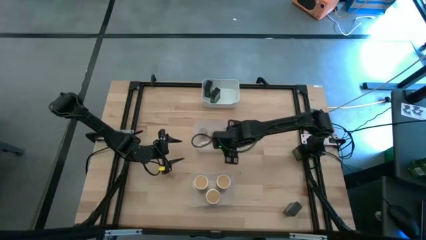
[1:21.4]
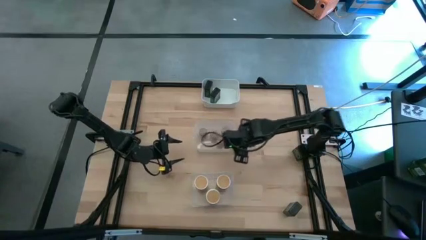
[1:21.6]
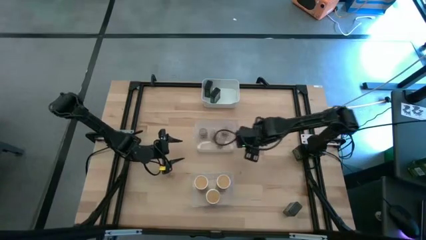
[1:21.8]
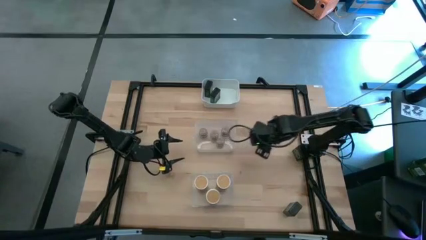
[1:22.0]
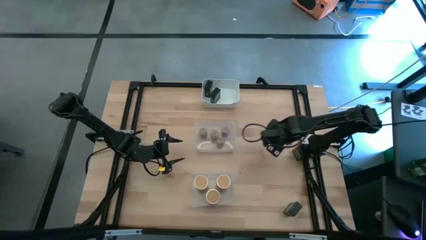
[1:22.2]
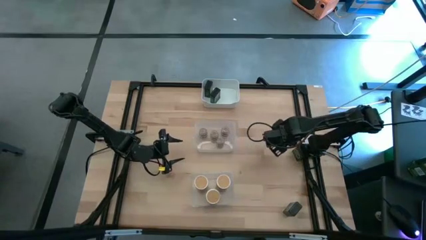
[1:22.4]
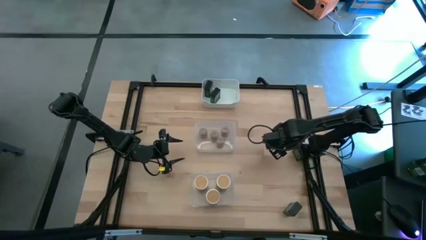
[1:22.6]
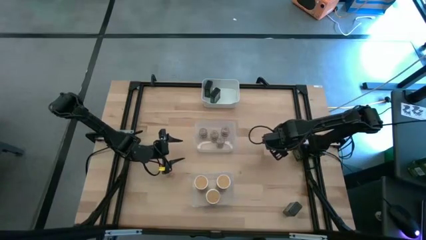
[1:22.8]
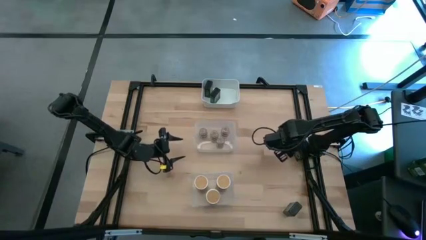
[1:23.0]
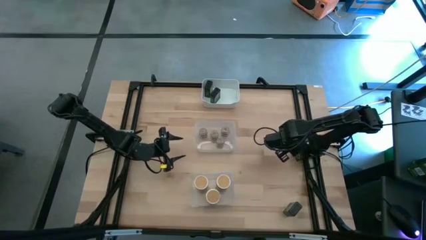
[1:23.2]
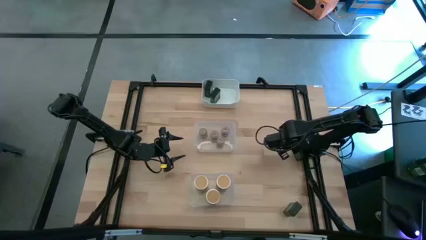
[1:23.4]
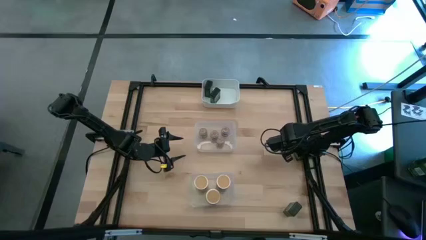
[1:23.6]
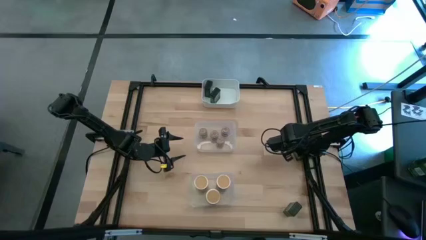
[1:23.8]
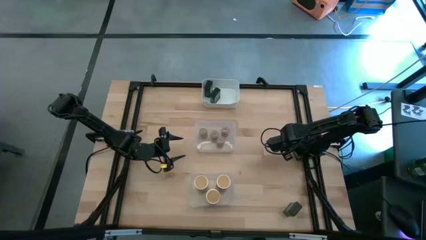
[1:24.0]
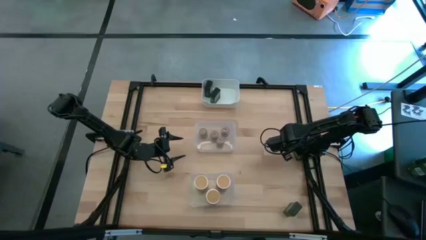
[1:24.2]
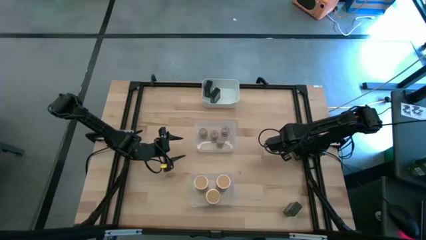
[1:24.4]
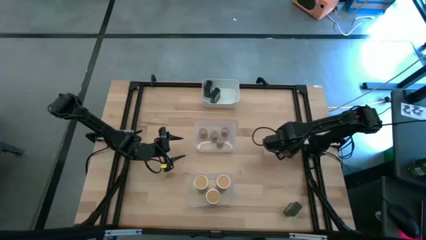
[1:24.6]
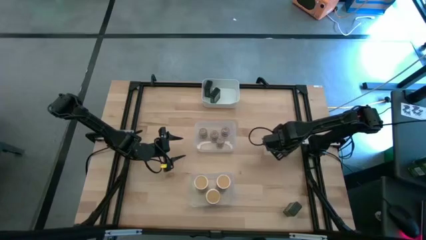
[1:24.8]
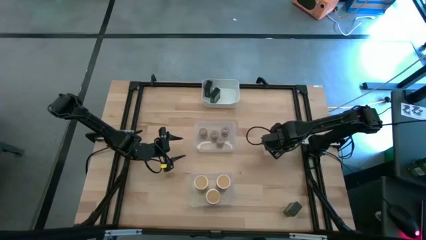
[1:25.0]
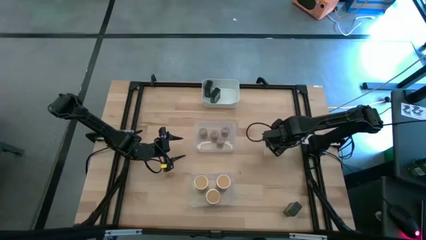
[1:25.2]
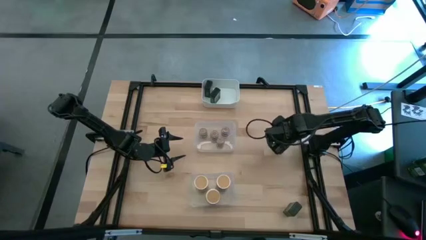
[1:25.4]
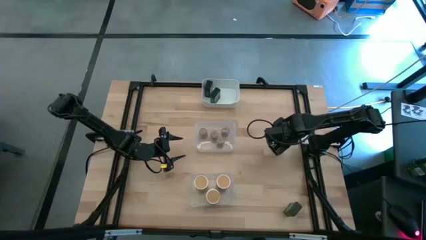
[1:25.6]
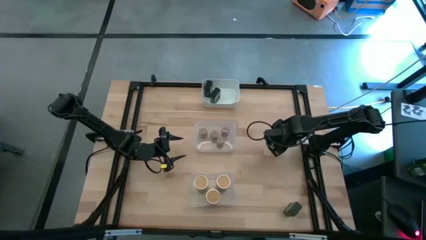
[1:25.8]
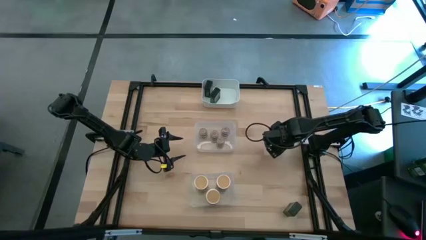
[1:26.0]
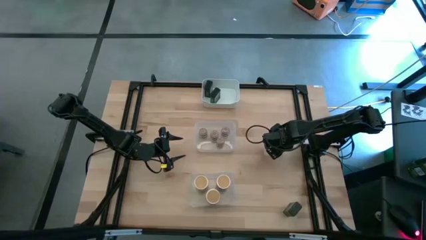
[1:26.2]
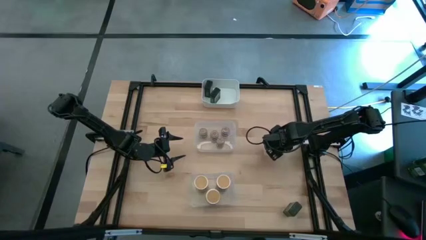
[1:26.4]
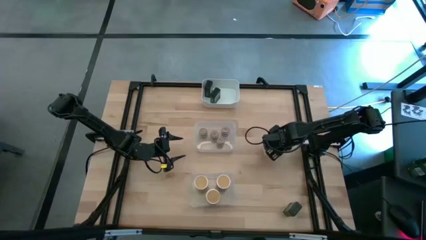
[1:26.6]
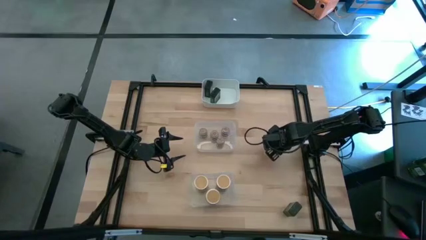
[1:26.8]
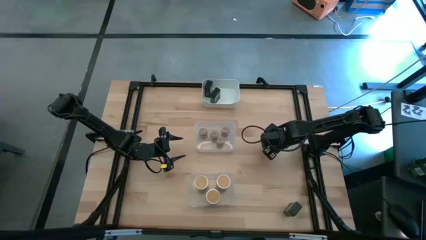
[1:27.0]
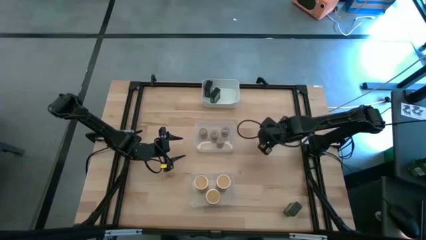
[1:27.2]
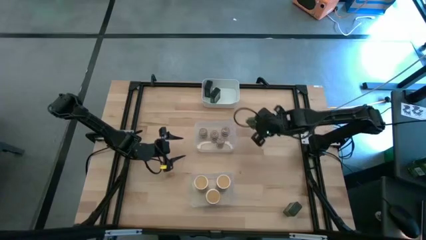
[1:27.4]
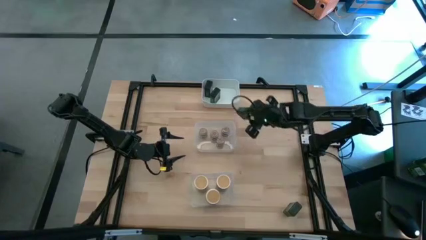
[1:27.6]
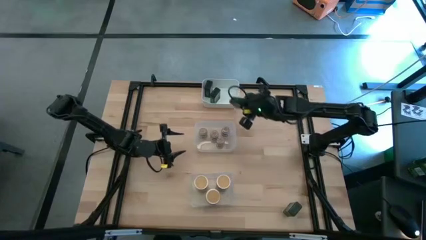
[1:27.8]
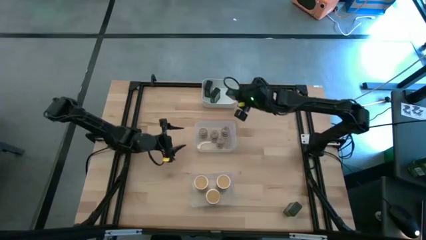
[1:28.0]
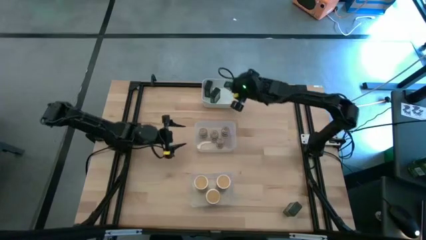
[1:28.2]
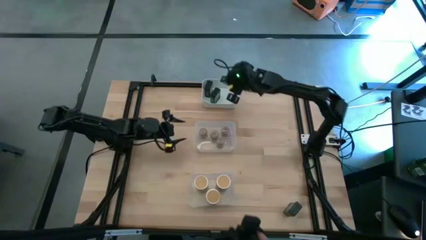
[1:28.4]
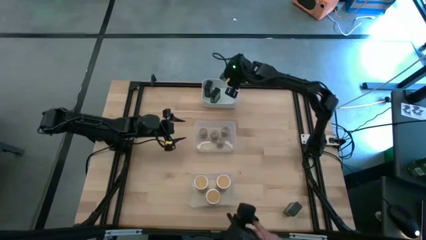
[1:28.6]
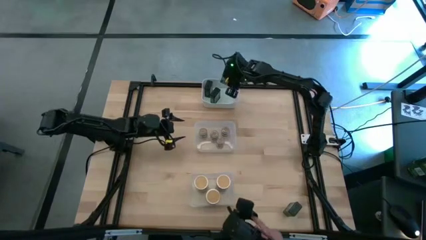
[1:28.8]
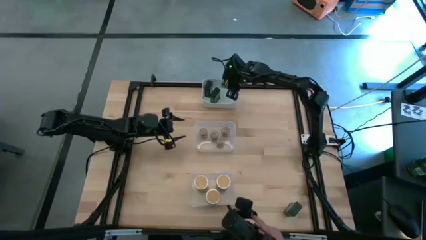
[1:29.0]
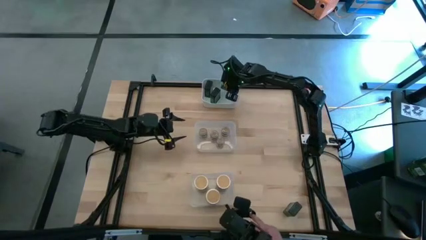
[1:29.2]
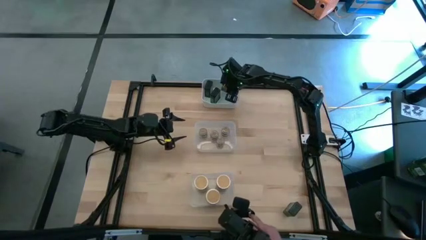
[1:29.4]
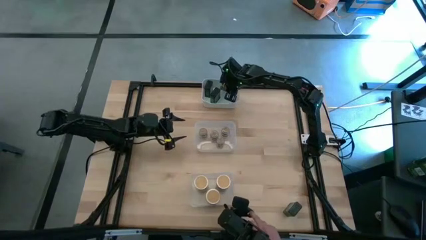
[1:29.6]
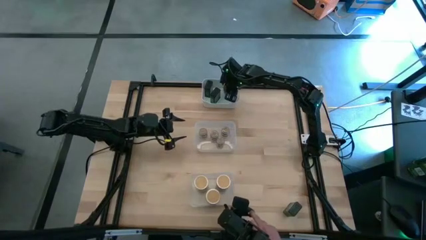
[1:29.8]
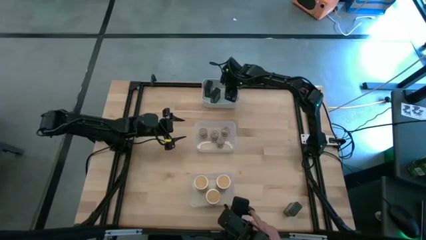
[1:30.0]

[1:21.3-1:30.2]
Task: Sort spices by type
Put the top black seasoning can into the white bin

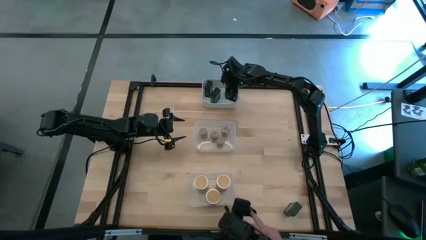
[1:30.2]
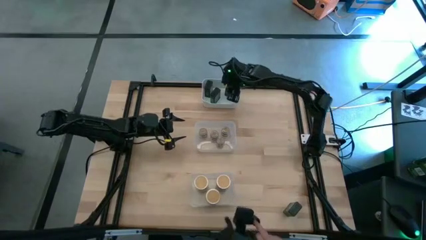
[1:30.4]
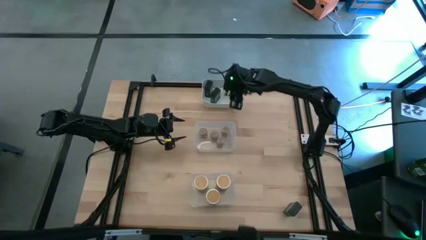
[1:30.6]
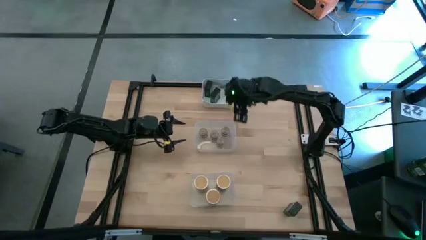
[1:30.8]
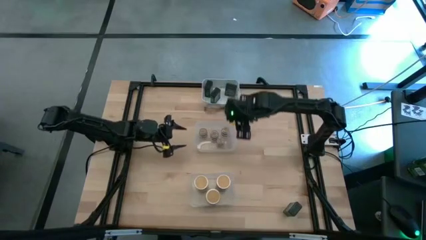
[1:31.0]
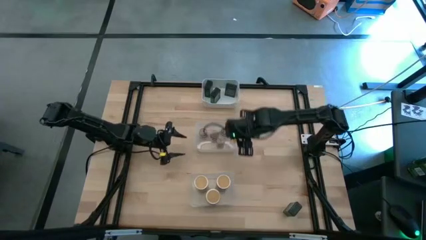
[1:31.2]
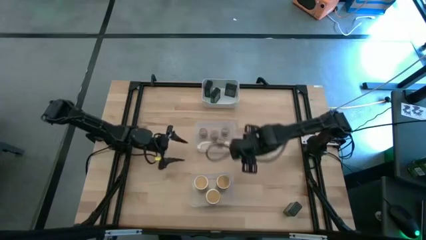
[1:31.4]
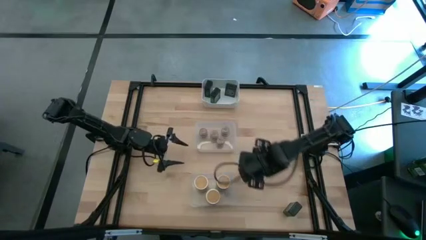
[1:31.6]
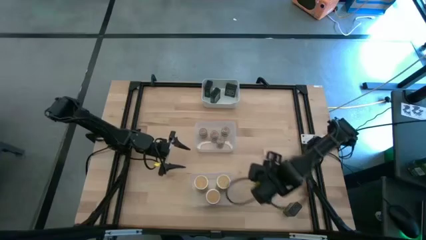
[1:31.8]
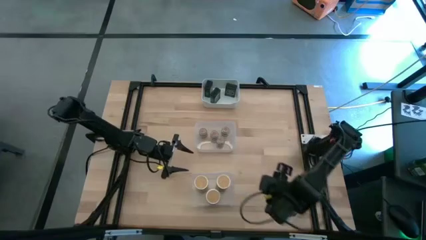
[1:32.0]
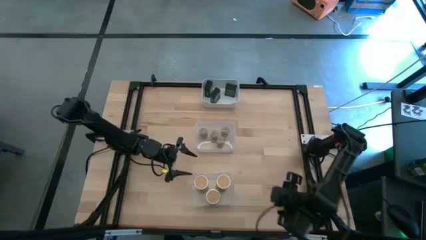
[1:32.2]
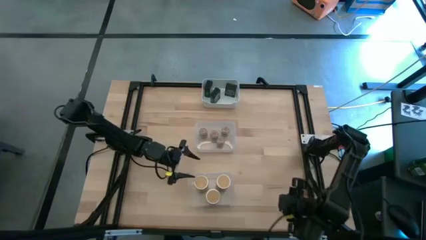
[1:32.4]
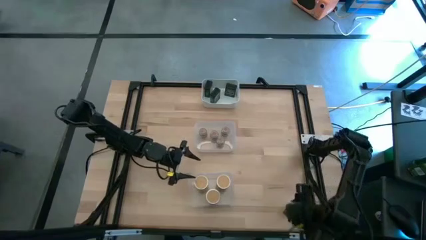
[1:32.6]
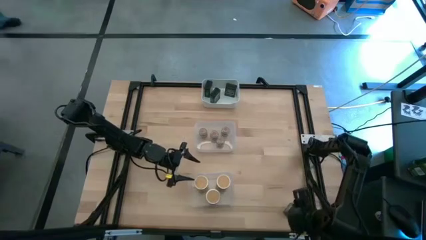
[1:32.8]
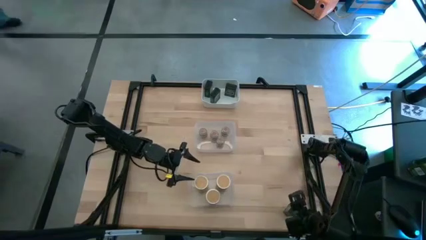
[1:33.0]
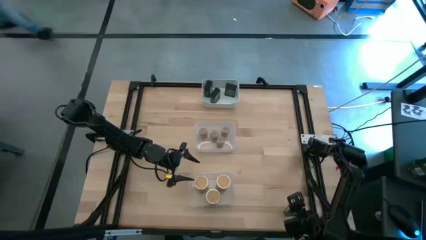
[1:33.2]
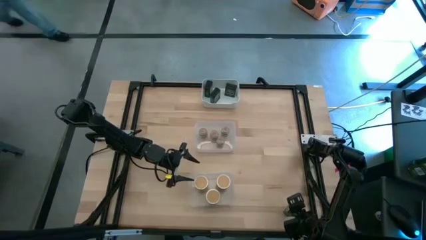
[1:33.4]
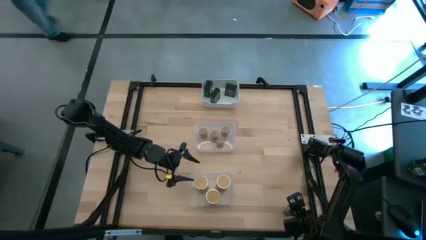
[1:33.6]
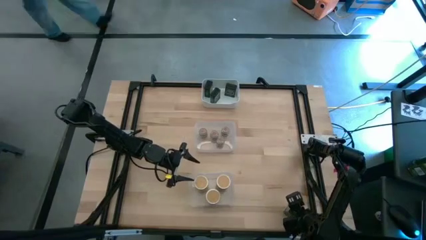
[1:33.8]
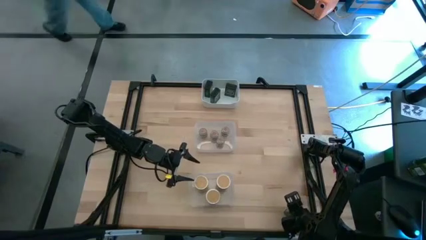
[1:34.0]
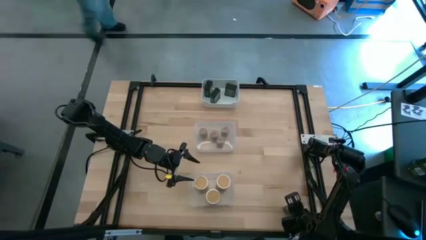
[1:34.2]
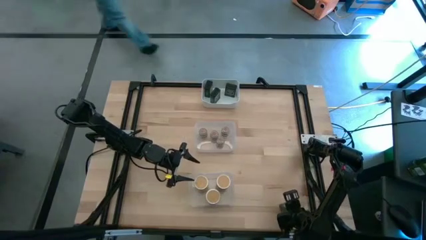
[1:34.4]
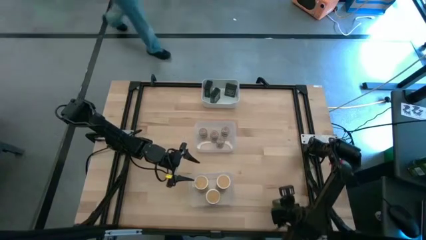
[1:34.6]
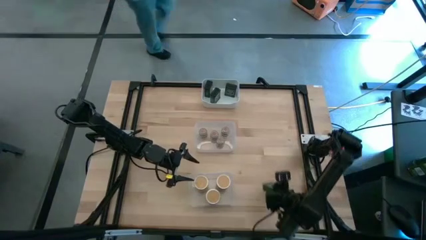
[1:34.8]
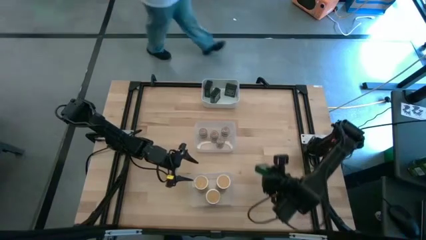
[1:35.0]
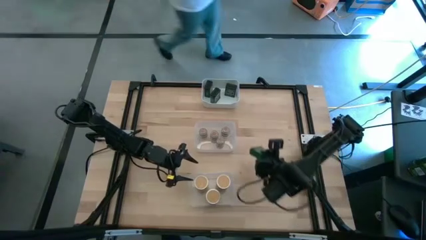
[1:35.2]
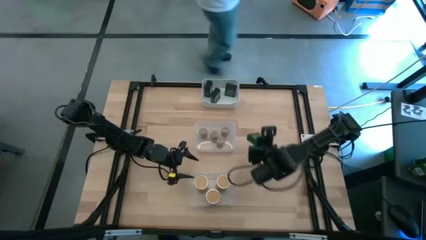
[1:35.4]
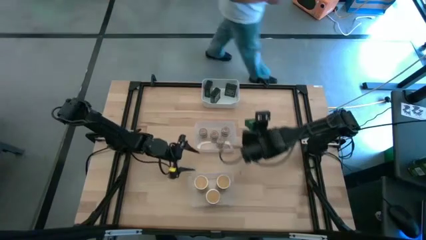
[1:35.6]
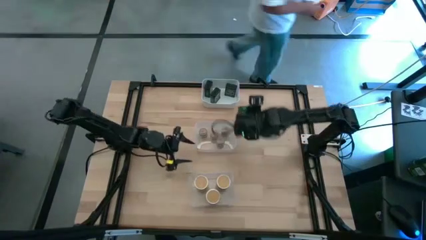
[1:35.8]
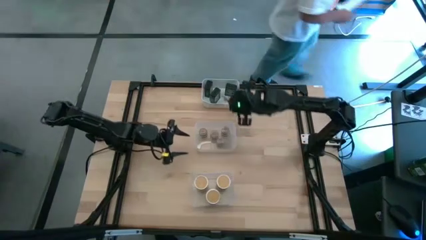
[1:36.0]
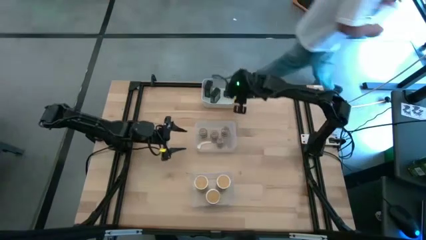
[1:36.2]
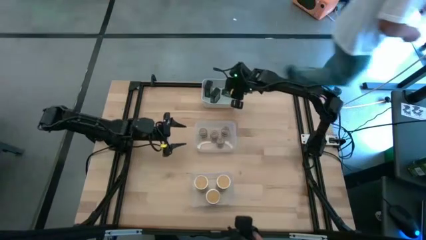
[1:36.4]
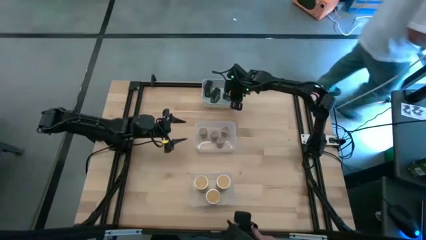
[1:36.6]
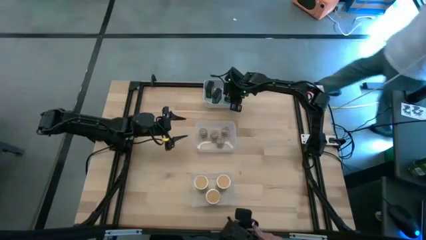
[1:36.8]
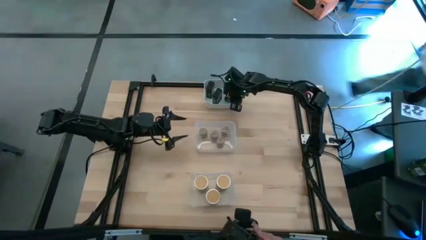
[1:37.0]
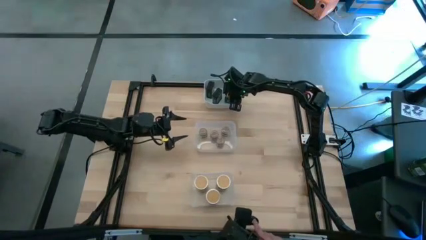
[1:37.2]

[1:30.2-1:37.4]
Put the black seasoning can into the white bin
